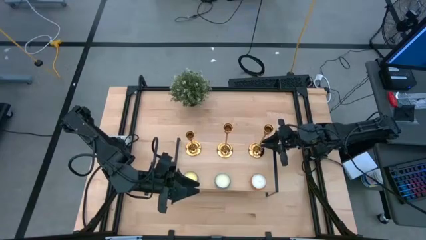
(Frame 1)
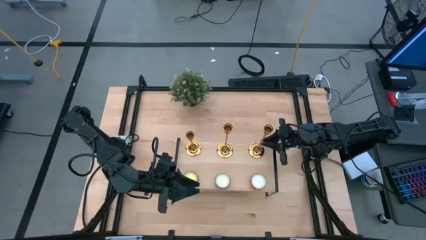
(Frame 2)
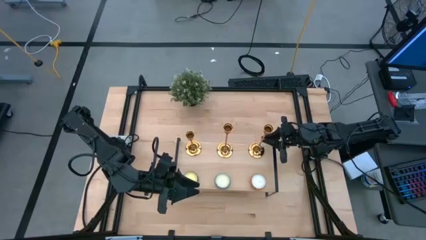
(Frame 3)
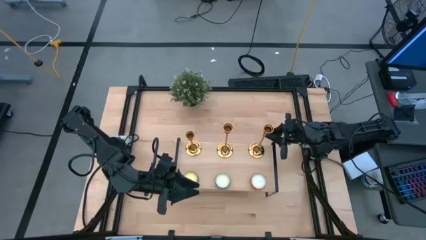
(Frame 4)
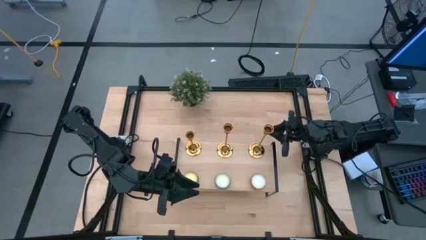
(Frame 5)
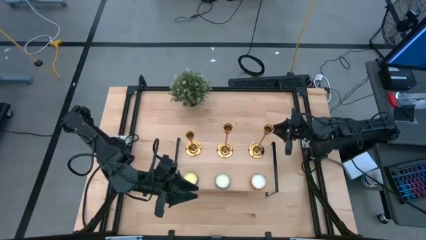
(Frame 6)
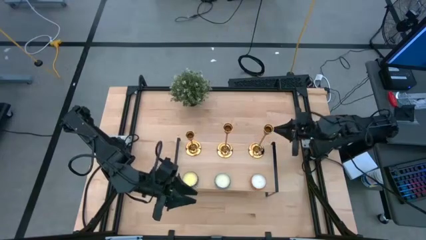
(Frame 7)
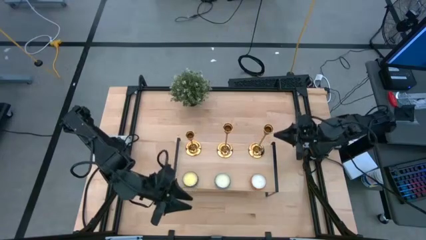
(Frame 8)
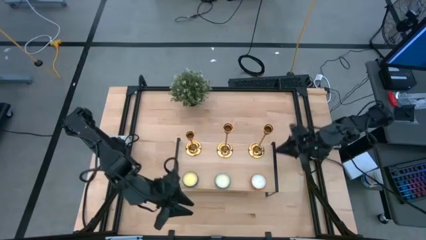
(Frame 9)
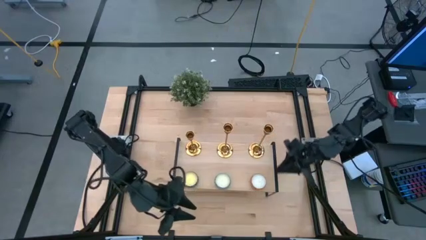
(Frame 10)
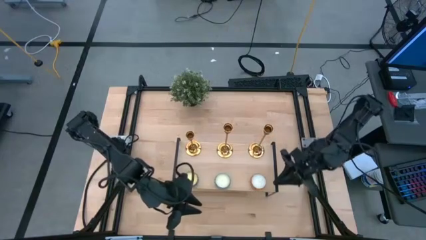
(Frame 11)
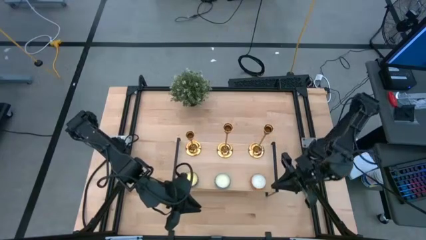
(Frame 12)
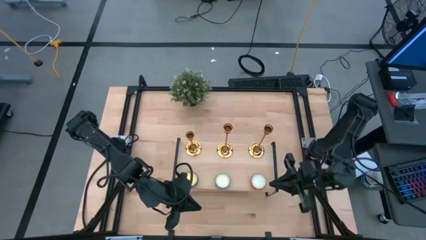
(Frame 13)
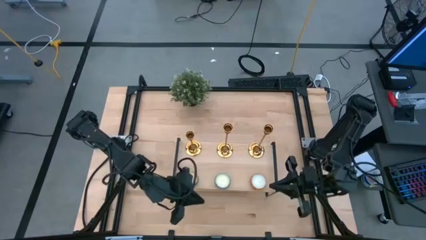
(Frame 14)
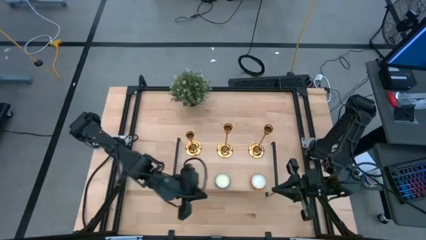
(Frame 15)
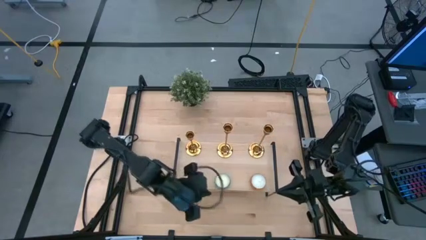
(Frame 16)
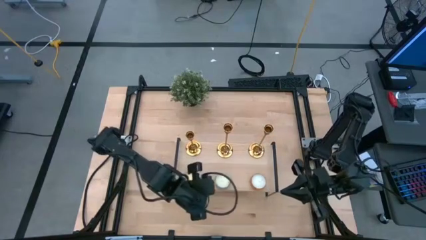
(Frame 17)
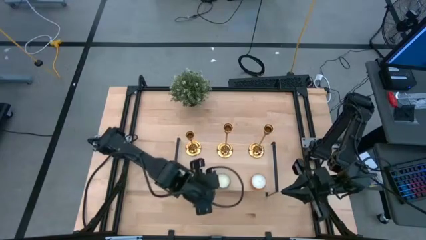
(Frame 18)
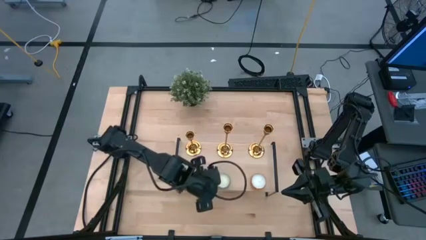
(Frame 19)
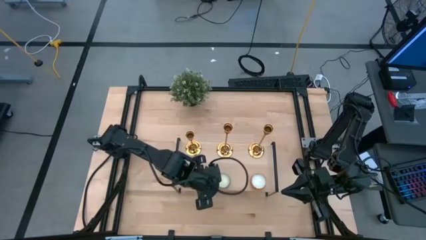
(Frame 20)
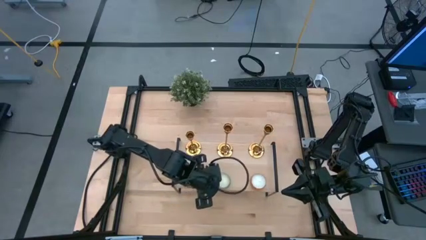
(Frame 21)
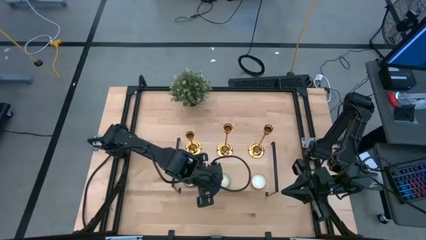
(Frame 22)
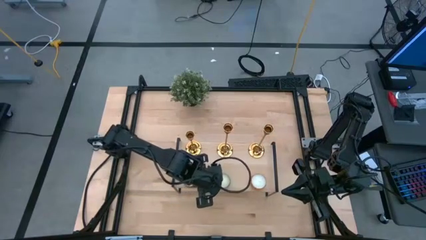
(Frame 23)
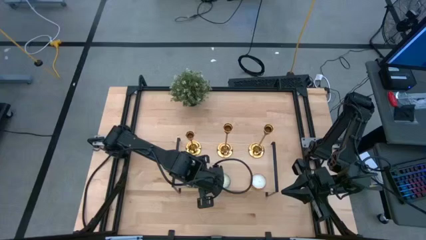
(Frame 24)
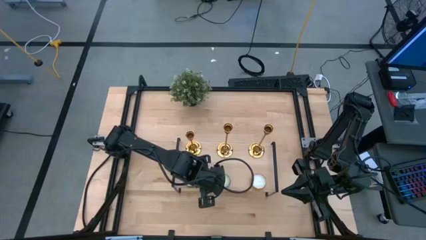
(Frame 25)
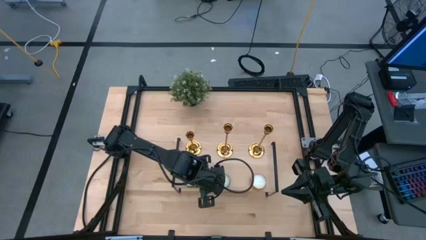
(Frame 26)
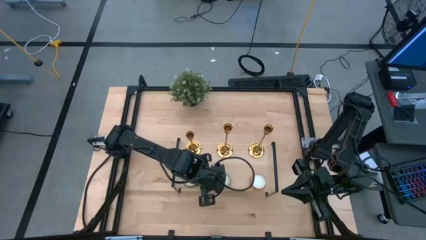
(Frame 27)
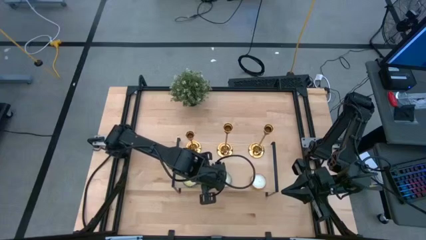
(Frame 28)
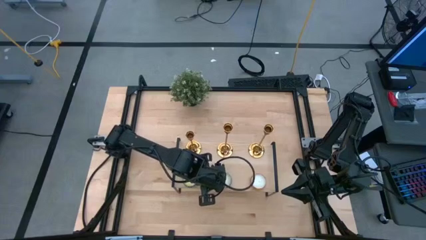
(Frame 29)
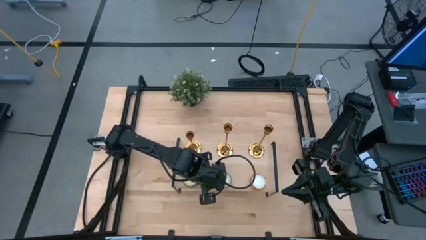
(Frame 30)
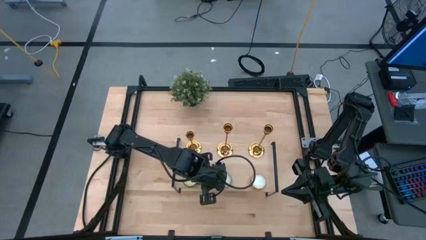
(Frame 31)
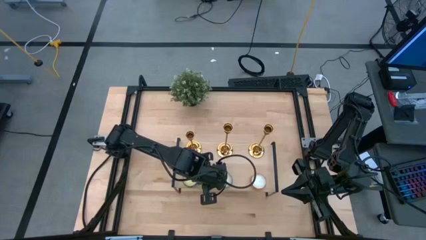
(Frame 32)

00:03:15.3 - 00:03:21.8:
Task: Pick & Place candle stick holders
Adjust the blue scented candle on the shelf

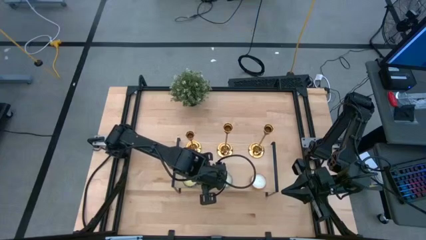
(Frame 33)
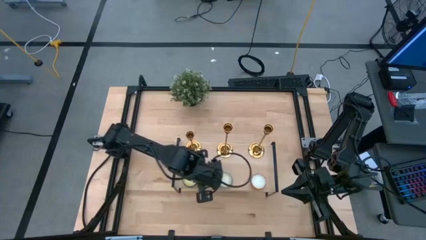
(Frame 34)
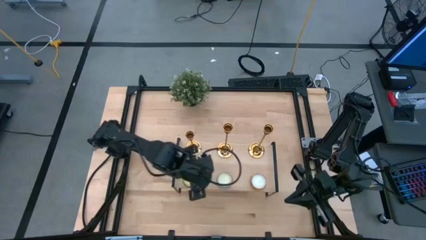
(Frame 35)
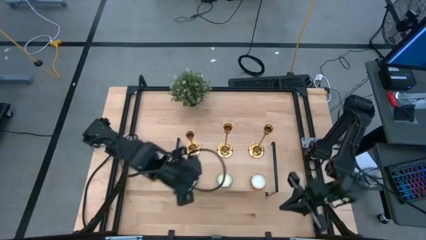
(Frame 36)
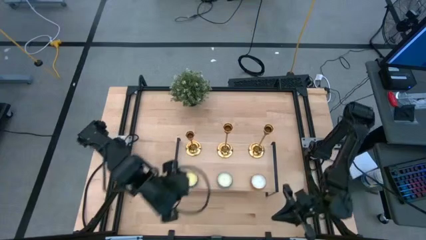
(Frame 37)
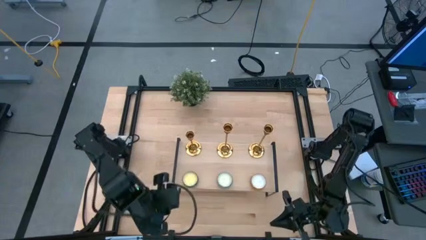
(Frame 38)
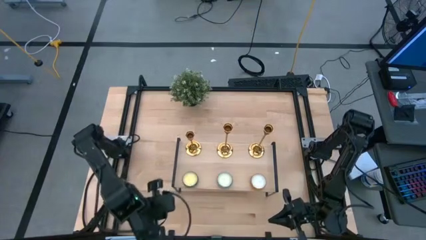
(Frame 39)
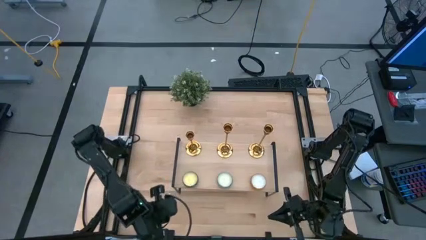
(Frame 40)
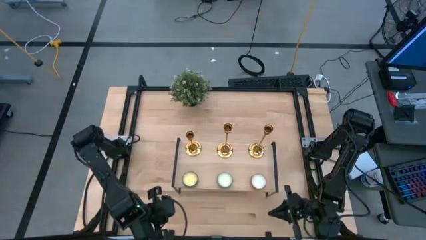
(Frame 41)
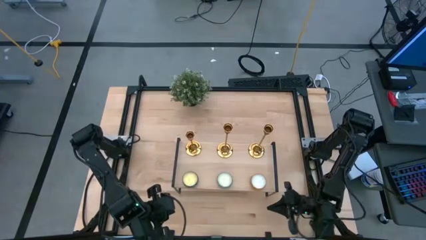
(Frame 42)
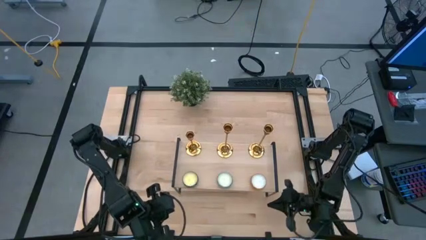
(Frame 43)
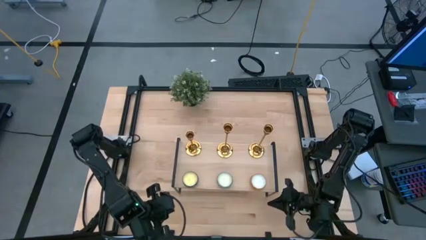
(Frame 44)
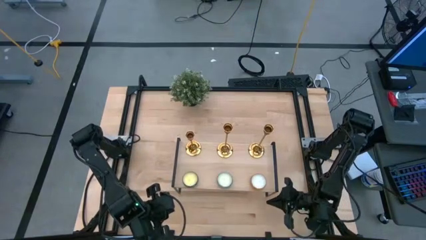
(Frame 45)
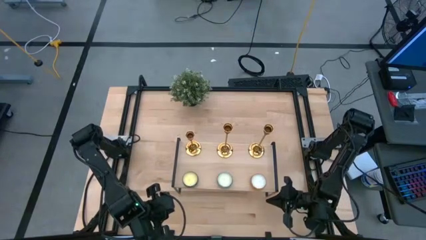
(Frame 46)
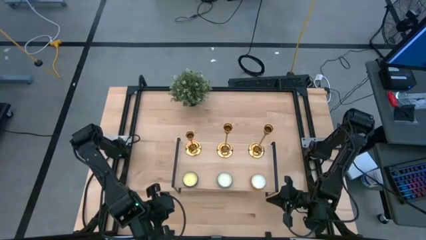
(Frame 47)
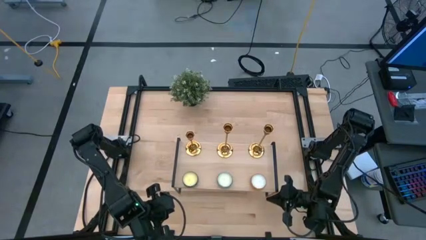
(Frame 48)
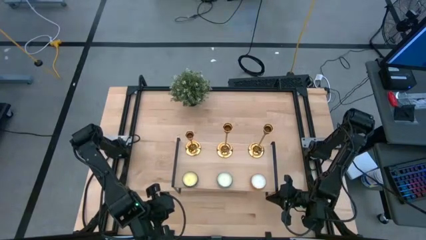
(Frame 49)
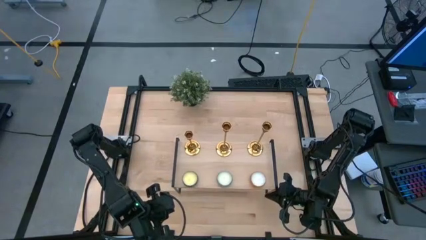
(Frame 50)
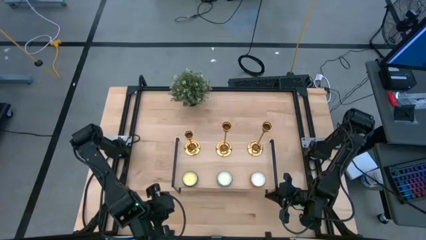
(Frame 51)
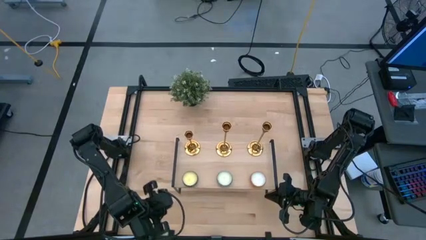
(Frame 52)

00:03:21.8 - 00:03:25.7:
Adjust the shelf

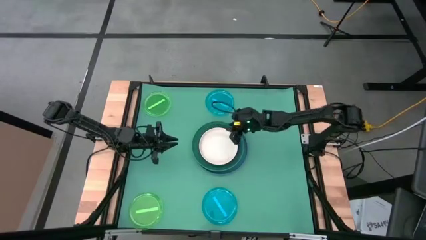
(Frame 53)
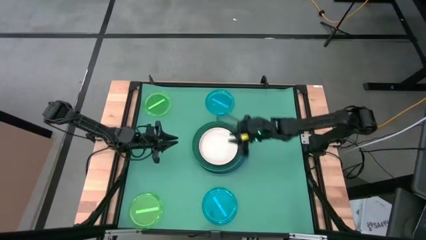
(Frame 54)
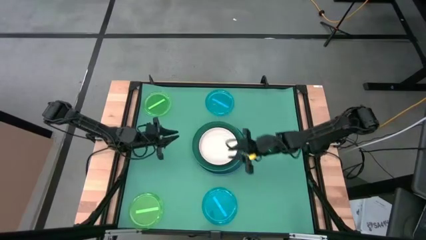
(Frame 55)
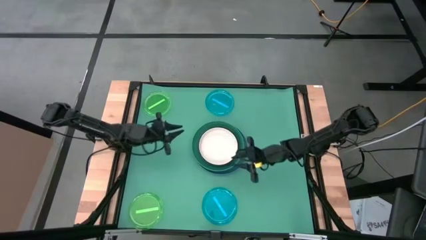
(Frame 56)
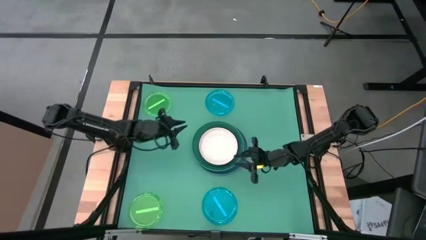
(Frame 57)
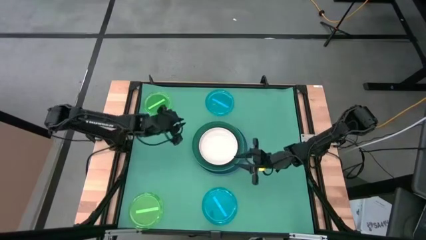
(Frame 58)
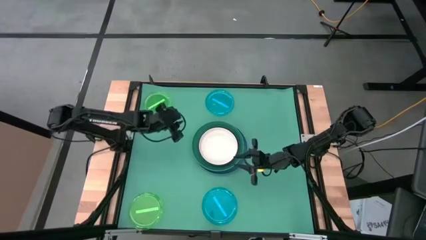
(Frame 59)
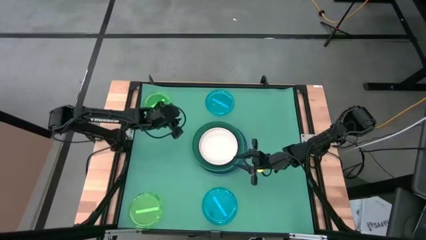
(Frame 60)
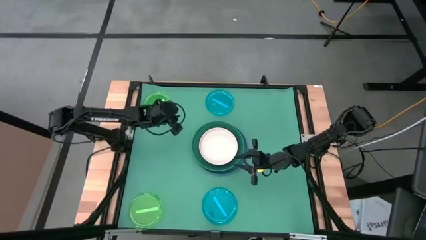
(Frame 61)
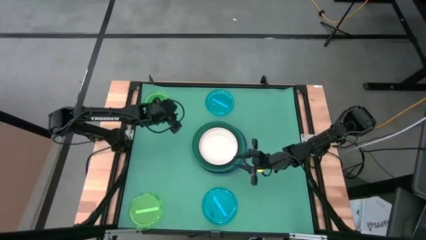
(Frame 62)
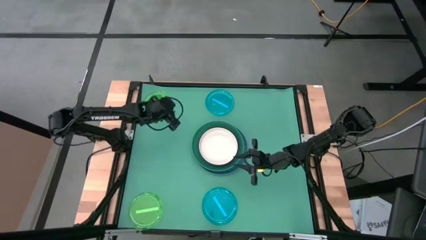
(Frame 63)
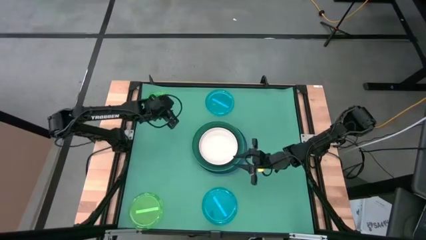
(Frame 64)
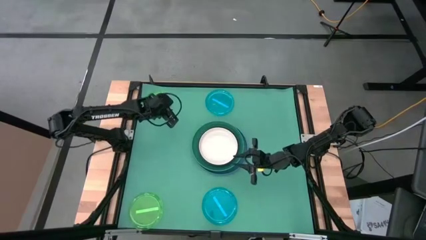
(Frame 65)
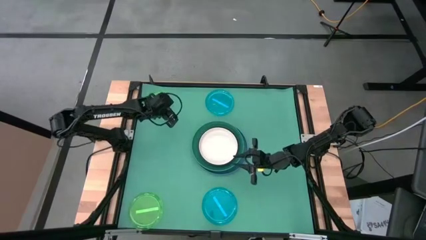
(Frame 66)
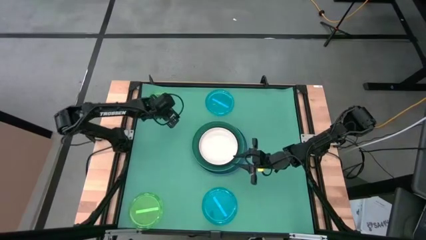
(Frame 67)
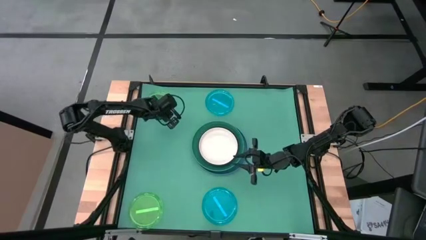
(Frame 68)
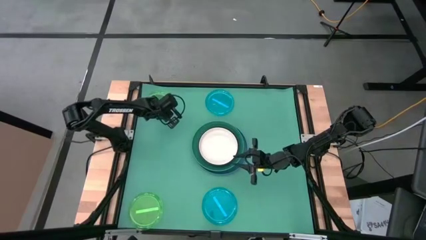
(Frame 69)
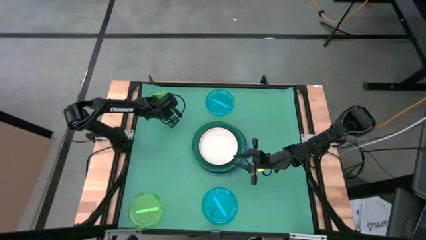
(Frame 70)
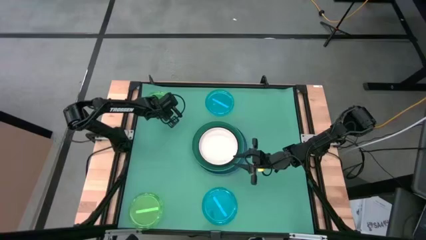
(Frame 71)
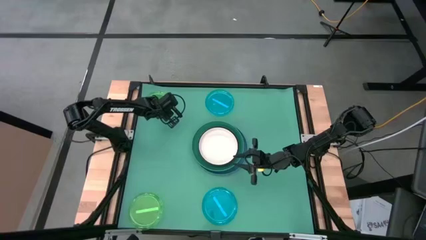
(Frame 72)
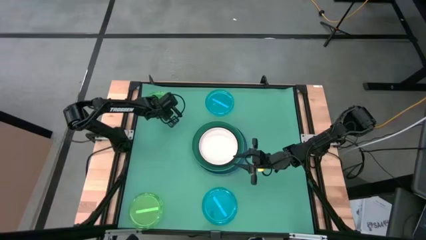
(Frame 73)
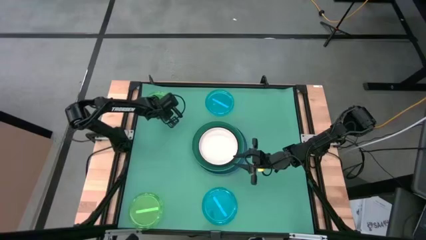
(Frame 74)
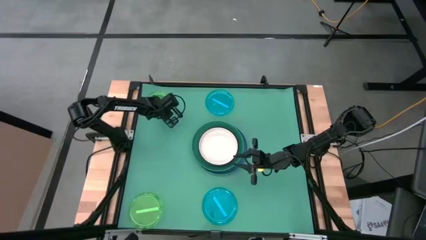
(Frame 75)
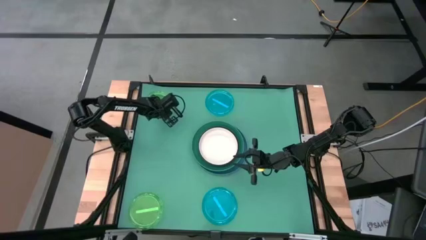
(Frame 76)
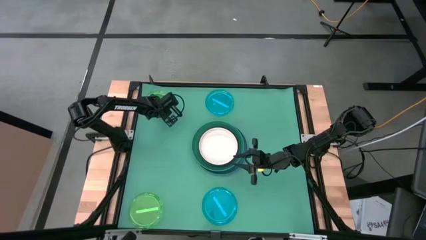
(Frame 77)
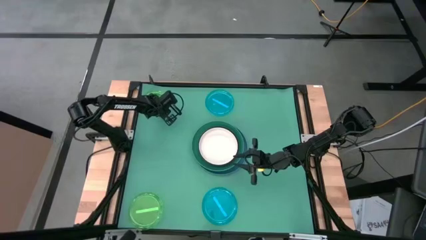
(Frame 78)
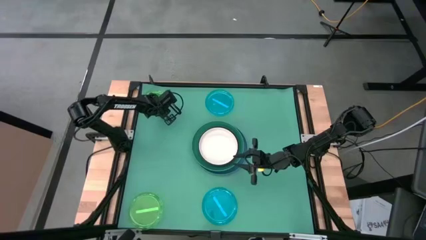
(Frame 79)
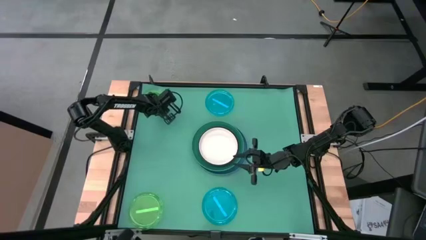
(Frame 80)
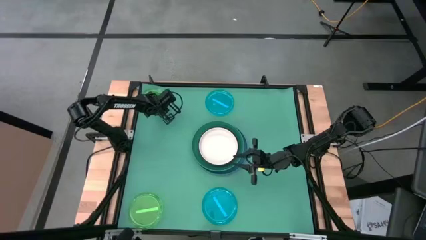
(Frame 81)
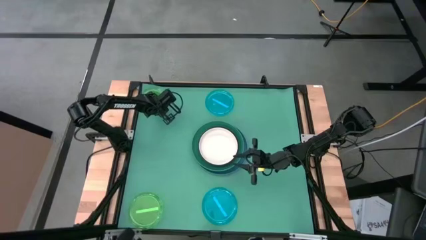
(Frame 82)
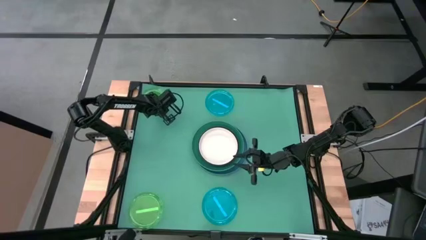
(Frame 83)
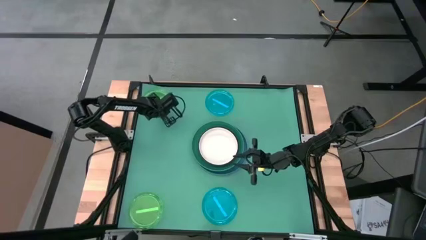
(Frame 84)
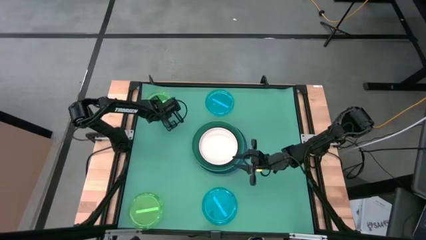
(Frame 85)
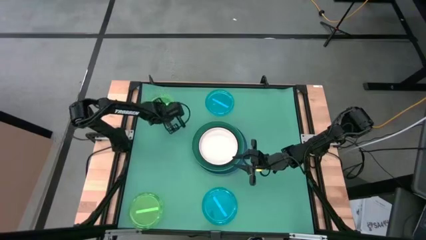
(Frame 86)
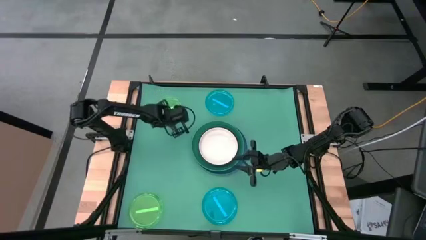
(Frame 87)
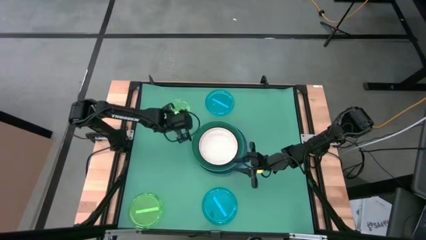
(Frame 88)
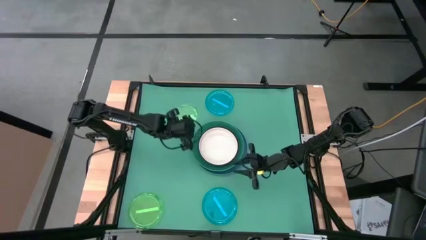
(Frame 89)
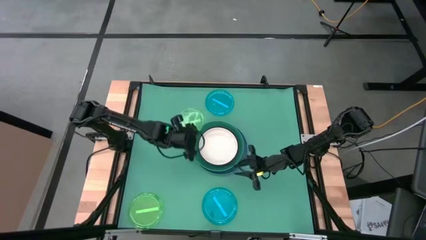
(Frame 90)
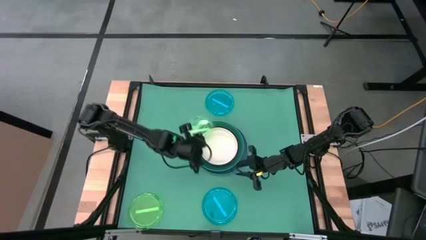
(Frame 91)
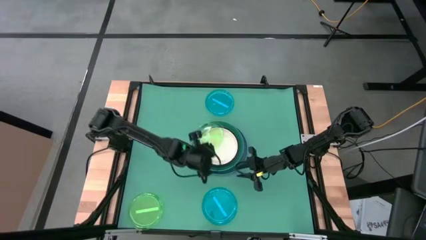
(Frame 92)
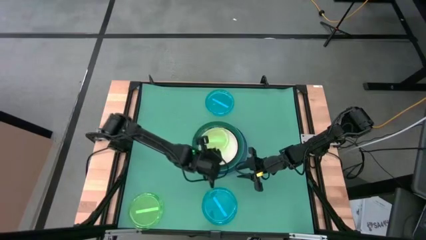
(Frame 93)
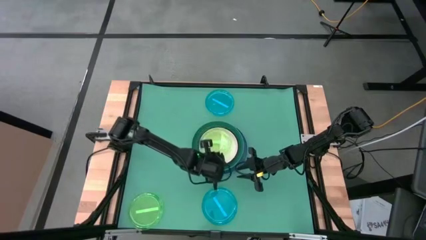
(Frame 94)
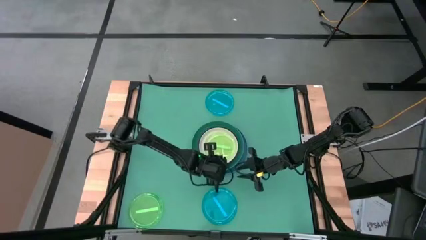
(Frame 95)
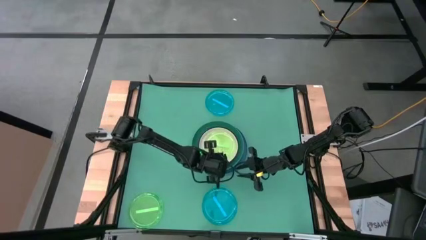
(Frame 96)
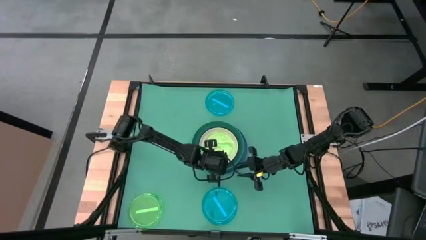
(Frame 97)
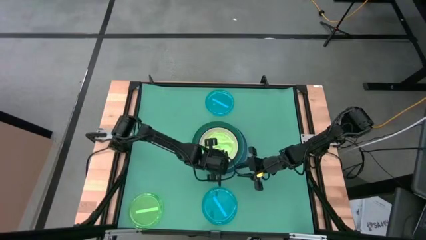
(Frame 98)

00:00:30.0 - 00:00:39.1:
Task: Stack plastic plates
Stack the top green plate on top of the white plate
